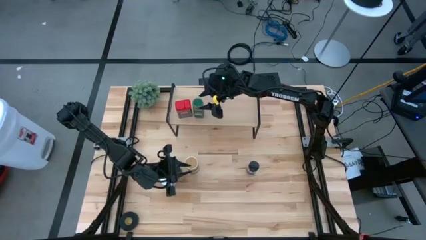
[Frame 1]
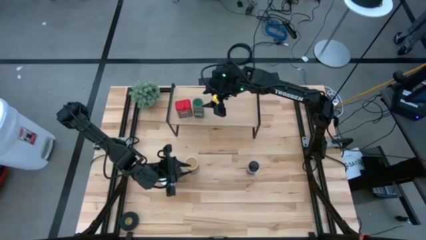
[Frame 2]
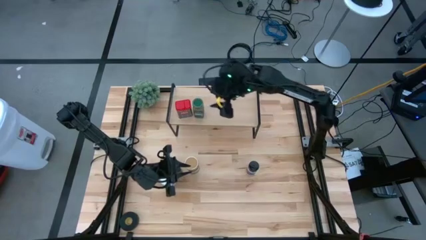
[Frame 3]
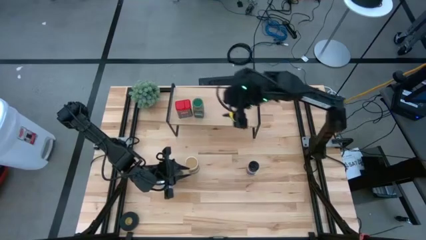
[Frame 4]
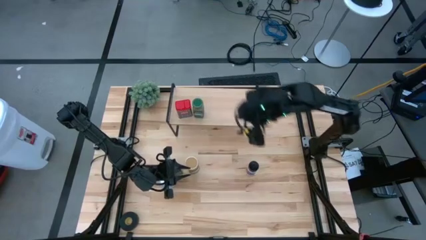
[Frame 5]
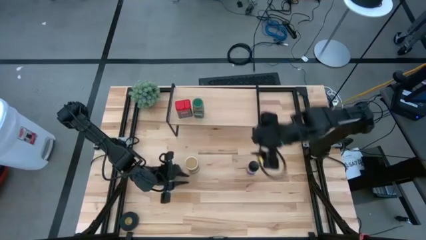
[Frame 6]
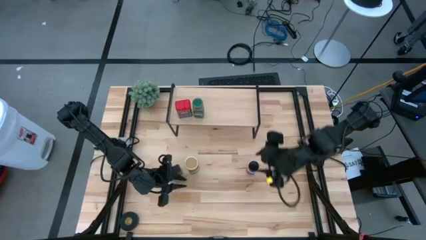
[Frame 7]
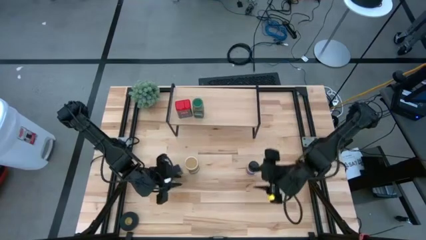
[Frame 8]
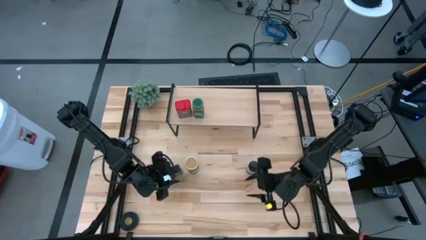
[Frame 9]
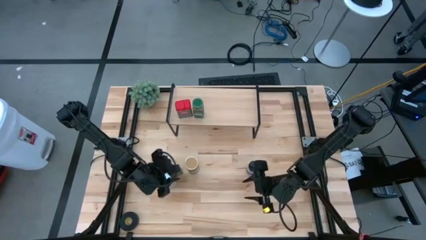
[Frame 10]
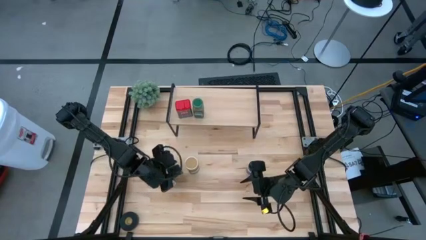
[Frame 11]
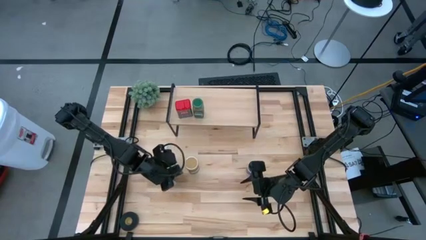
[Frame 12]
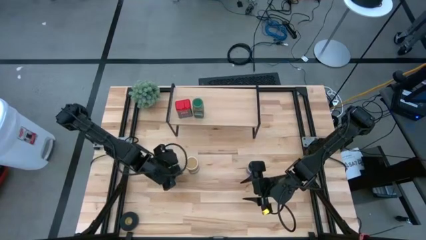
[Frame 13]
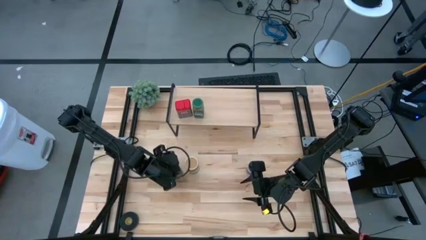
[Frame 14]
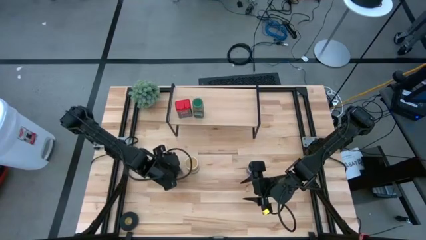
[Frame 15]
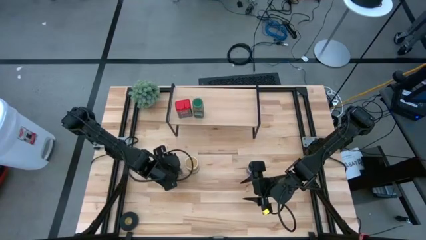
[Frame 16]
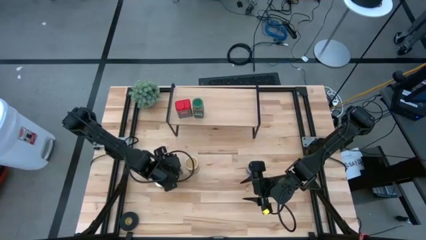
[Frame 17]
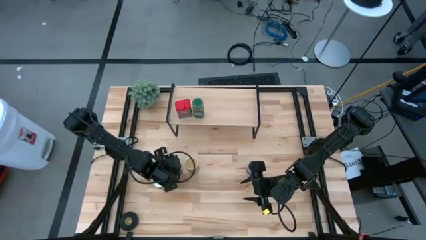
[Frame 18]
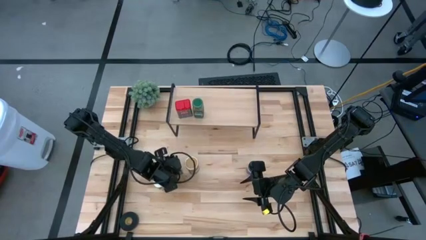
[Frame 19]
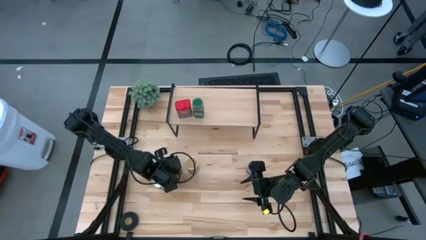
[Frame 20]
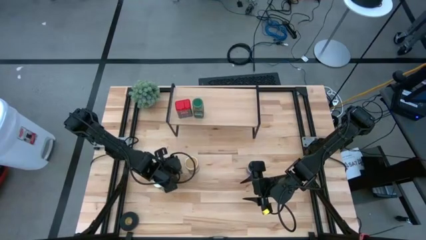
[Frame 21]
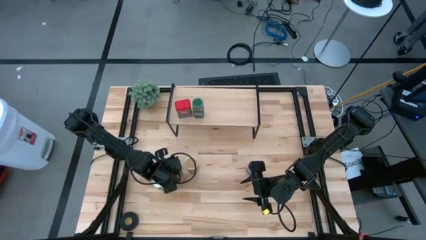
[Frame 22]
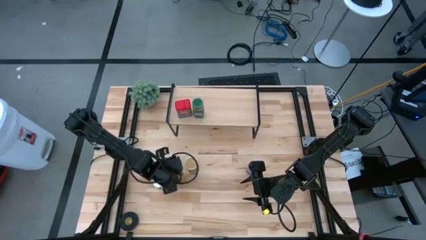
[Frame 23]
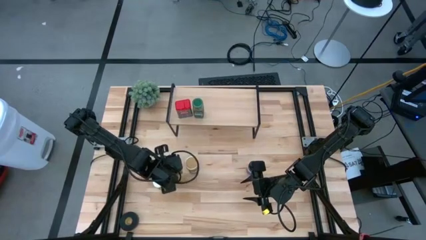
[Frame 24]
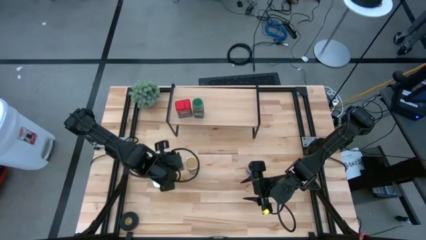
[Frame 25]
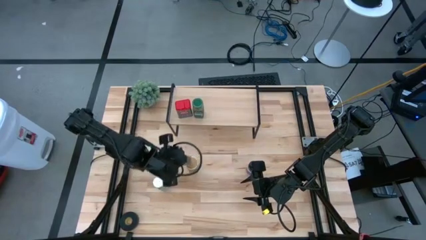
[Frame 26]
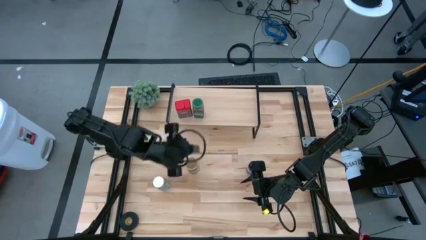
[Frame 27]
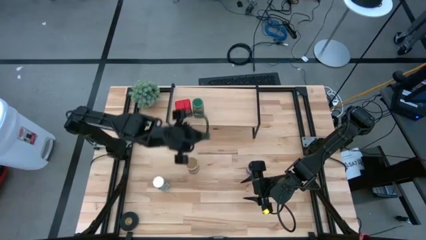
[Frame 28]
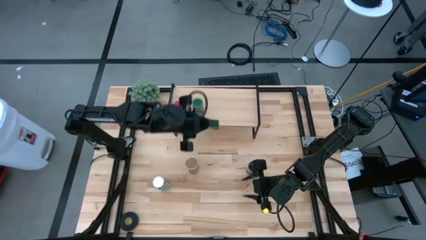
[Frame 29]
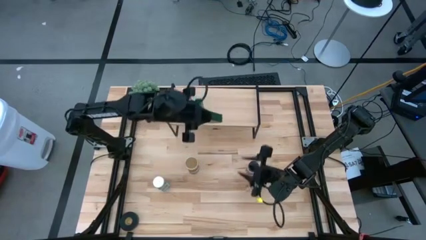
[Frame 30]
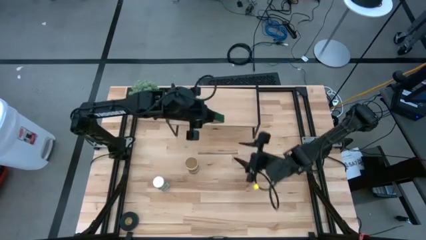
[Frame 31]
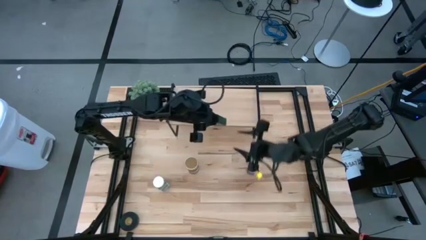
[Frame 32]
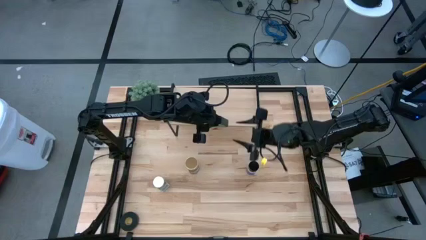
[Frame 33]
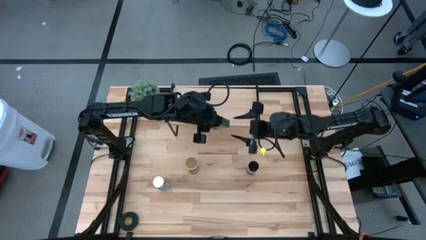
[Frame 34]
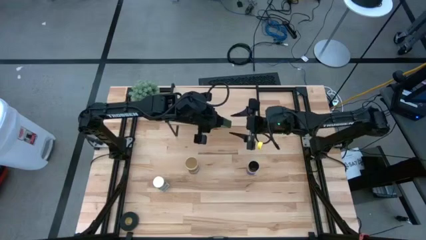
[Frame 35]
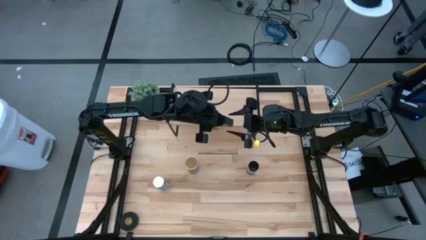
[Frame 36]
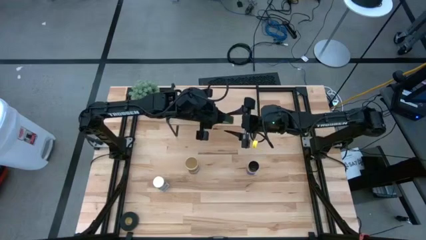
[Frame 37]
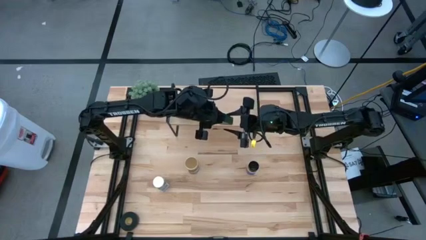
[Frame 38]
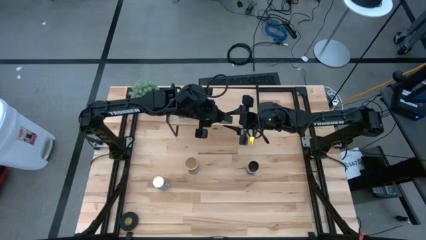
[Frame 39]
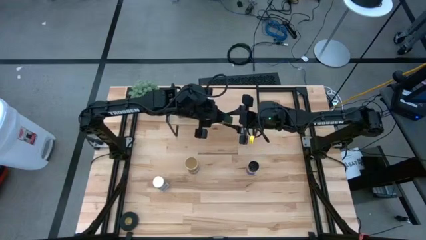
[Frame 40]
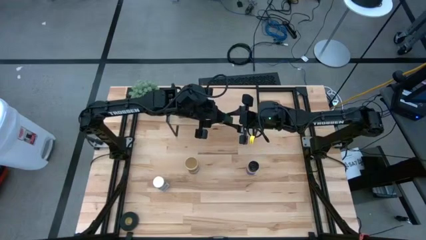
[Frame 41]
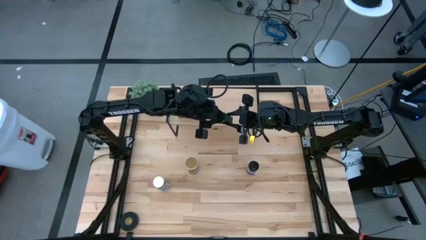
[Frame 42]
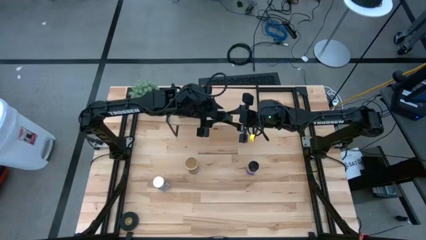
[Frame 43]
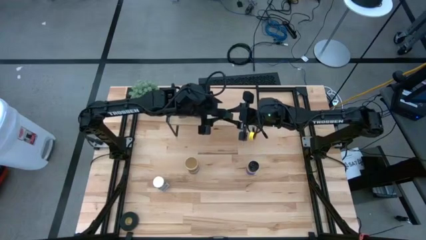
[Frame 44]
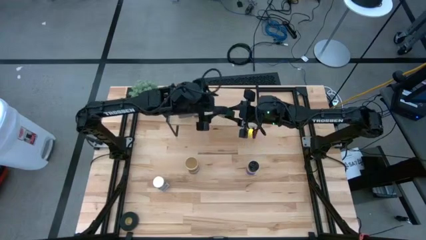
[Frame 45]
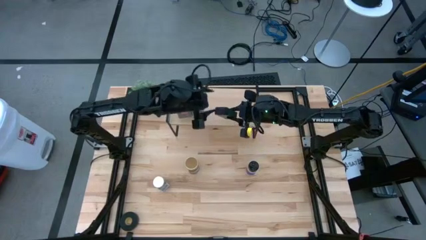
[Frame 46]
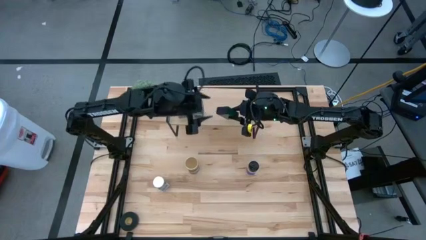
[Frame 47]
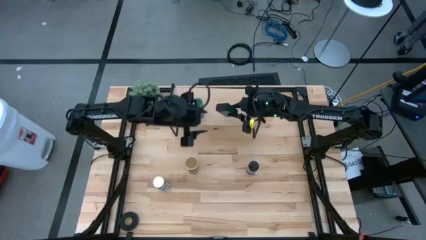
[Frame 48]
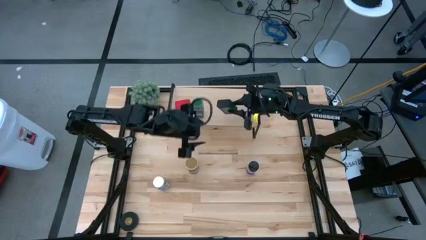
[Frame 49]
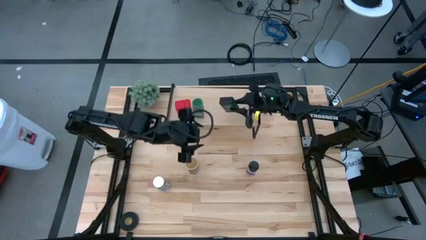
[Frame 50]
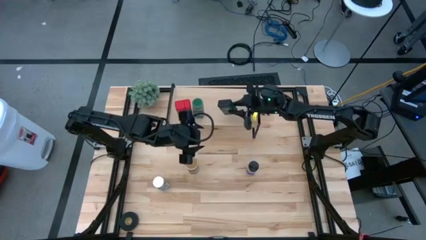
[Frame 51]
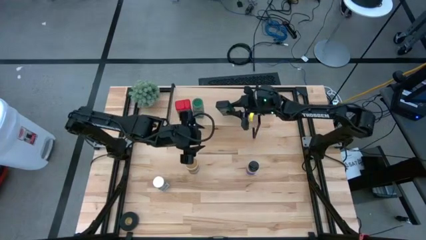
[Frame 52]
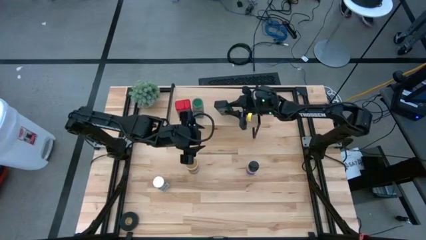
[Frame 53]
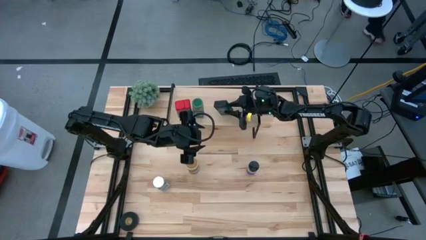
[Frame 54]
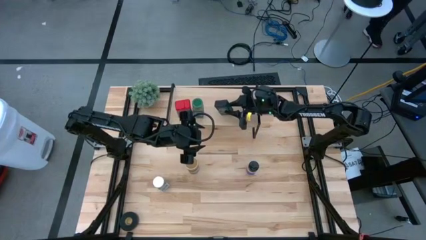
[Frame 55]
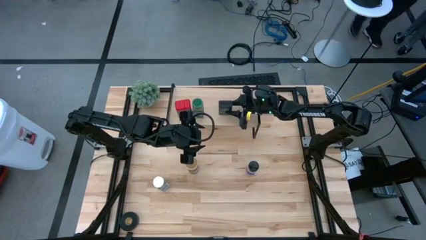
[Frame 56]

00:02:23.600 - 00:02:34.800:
Task: Shelf spices
Put the black seasoning can on the shelf

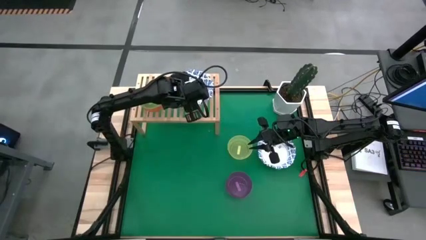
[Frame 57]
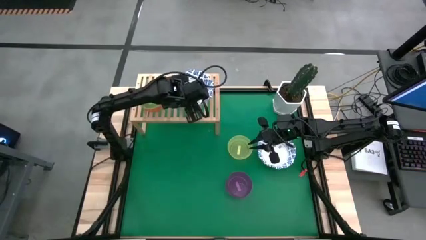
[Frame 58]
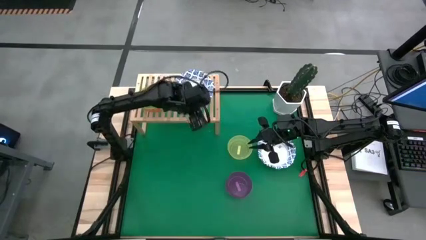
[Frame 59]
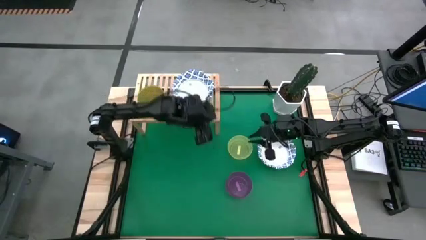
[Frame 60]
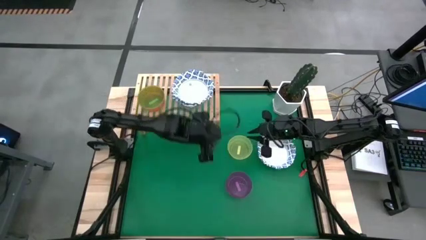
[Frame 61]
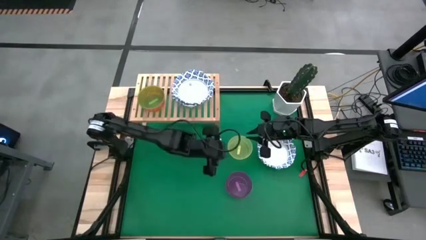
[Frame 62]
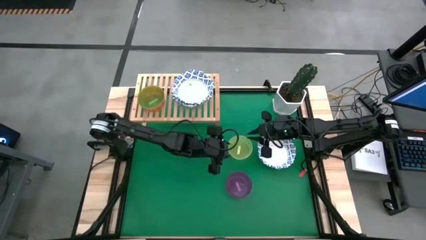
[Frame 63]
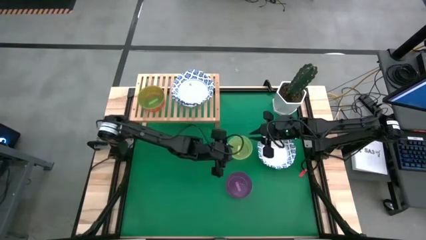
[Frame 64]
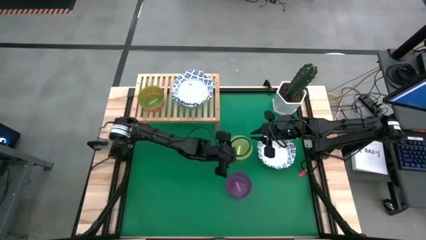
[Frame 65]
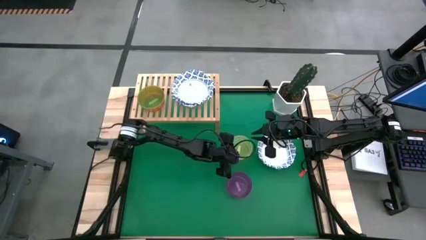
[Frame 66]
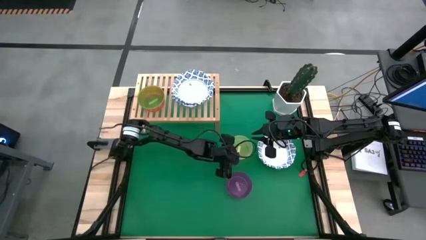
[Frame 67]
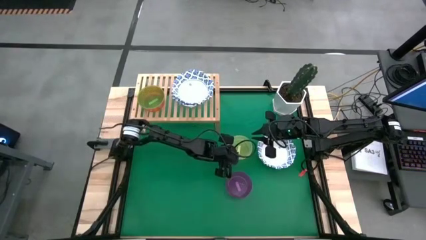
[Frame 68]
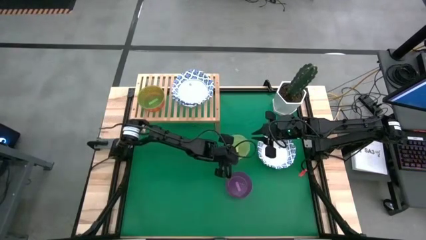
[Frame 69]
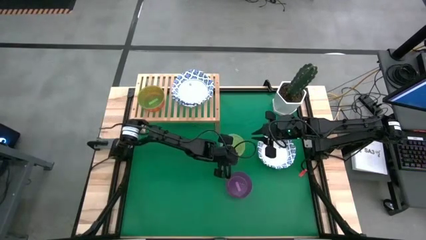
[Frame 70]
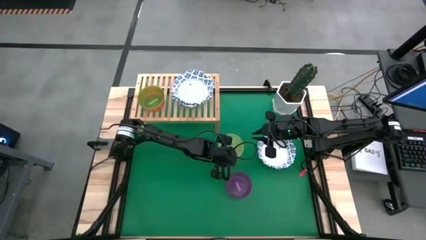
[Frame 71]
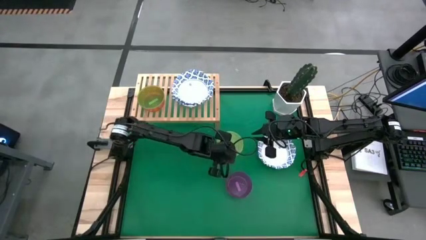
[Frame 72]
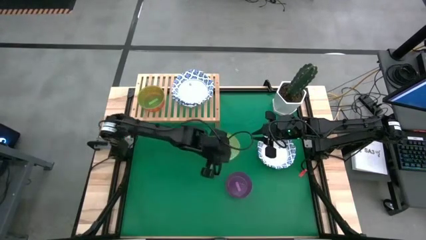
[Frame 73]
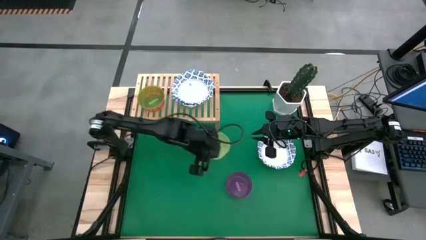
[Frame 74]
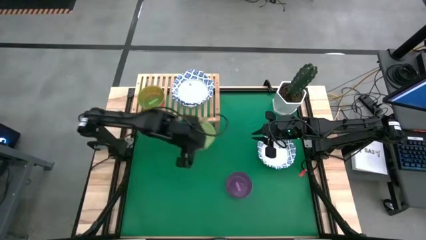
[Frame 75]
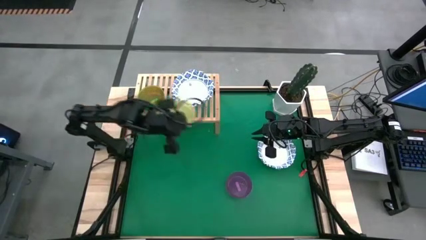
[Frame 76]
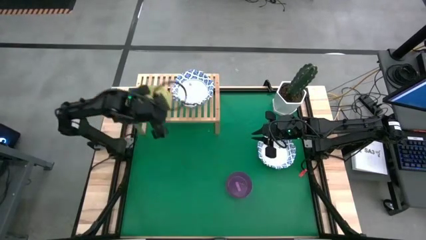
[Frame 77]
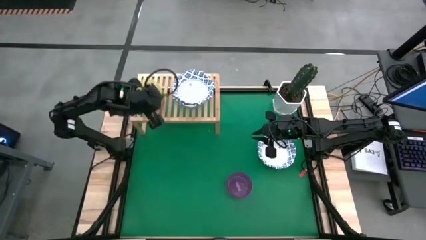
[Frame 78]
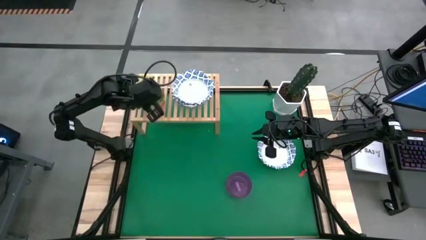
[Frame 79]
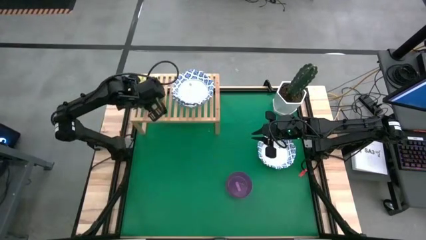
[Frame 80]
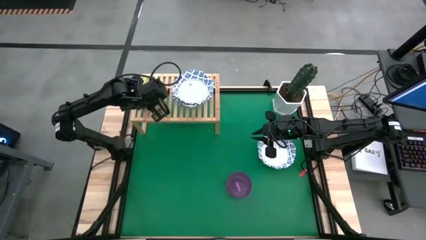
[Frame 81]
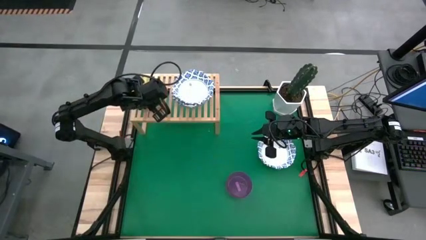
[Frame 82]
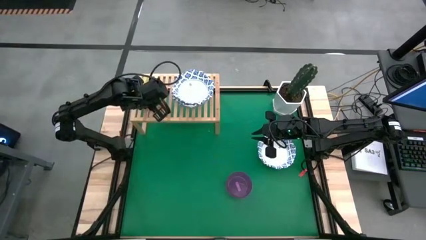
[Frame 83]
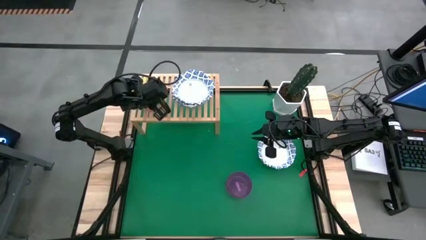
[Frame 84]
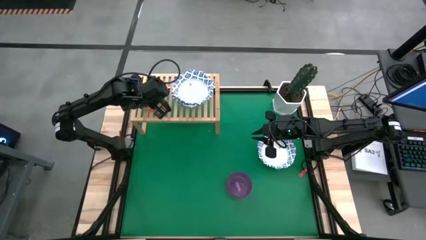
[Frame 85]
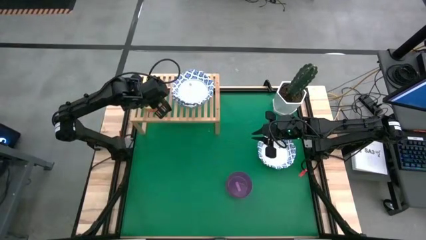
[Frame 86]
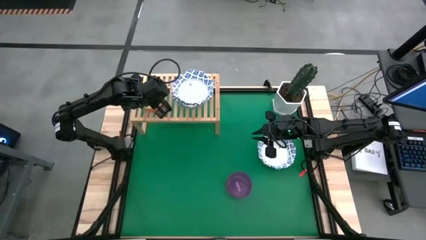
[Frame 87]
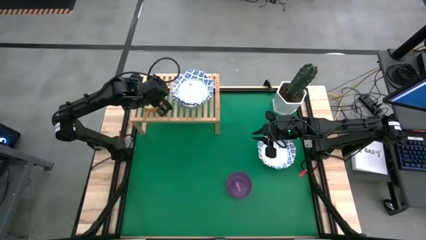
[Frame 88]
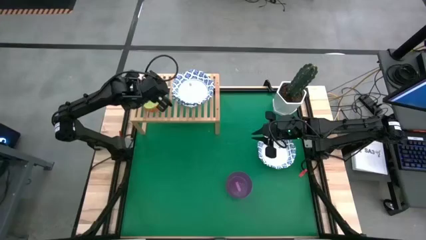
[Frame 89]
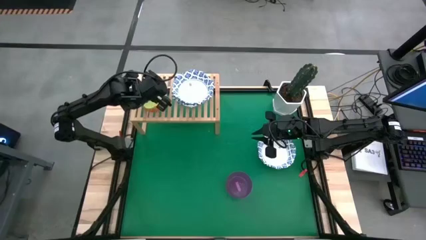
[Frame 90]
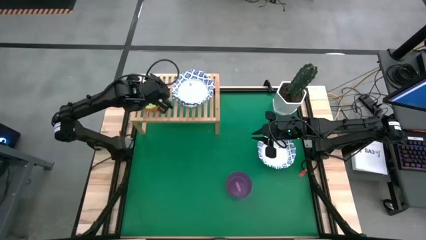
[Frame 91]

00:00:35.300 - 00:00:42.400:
Task: Place and stack bowls onto a shelf
Stack the yellow bowl on top of the green bowl on the shelf
